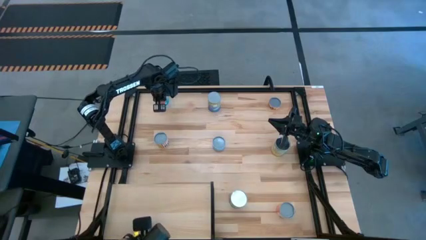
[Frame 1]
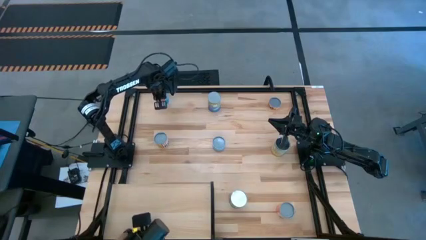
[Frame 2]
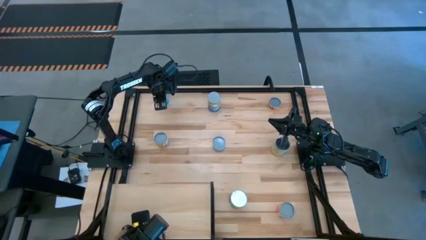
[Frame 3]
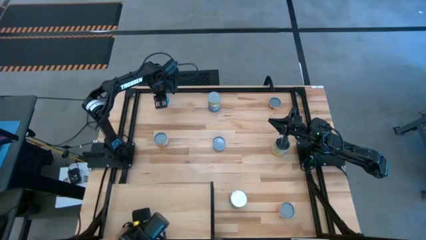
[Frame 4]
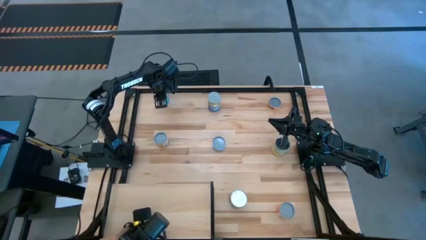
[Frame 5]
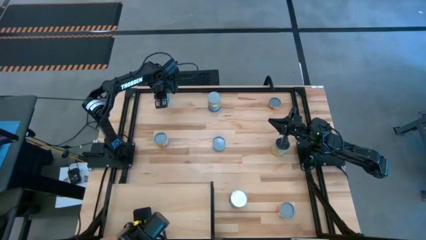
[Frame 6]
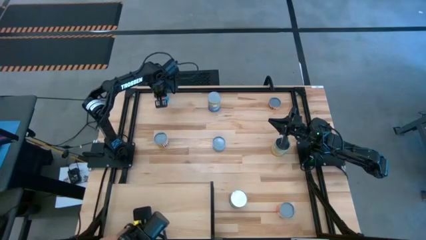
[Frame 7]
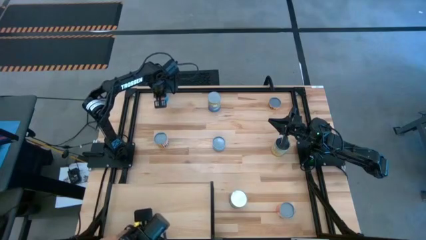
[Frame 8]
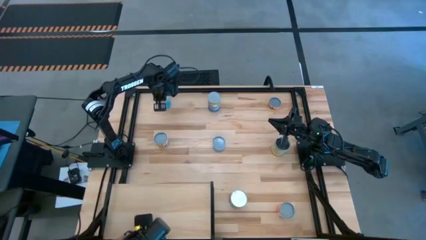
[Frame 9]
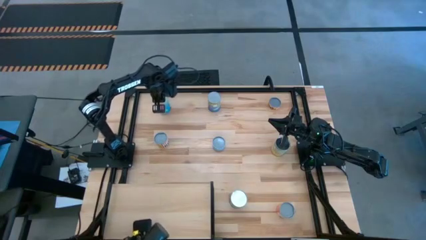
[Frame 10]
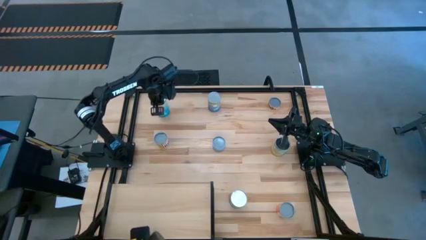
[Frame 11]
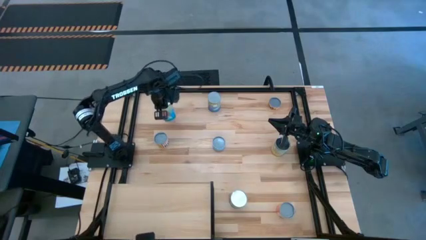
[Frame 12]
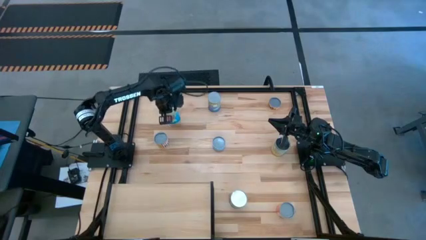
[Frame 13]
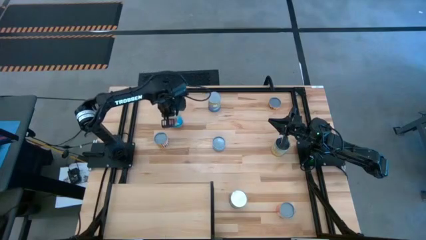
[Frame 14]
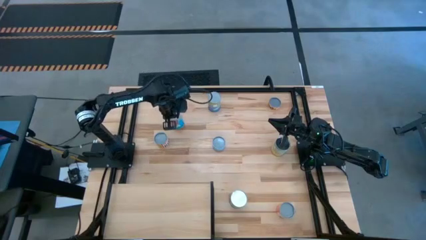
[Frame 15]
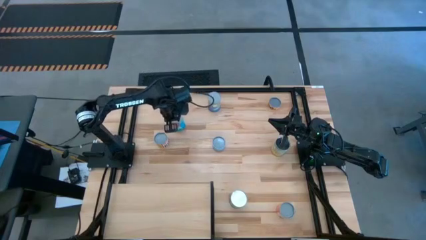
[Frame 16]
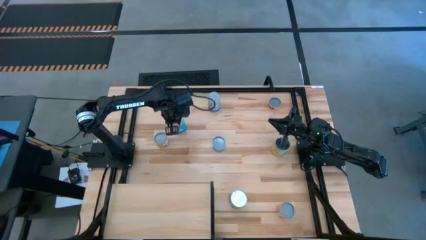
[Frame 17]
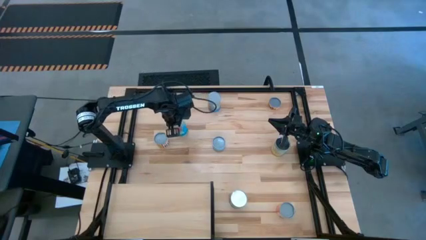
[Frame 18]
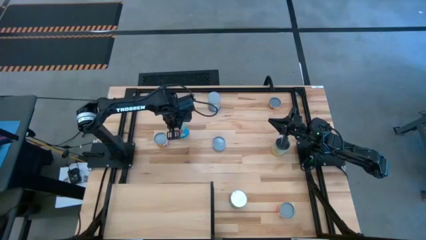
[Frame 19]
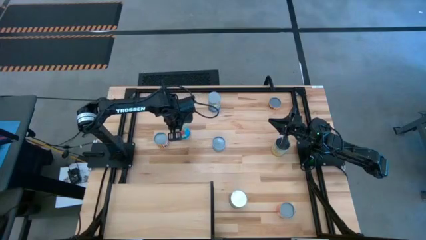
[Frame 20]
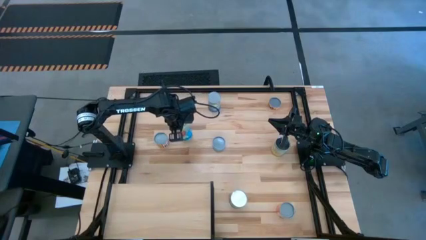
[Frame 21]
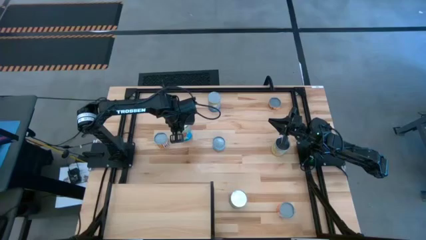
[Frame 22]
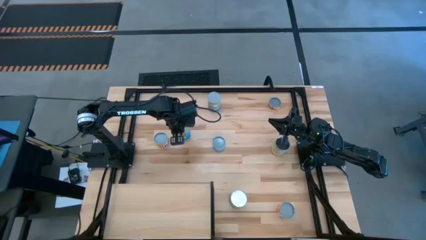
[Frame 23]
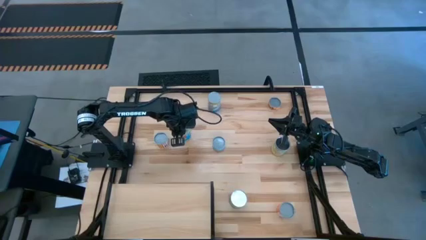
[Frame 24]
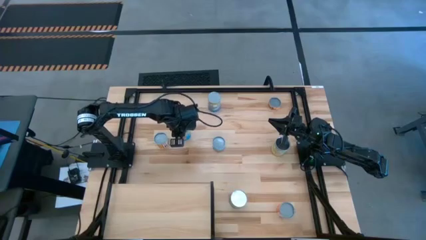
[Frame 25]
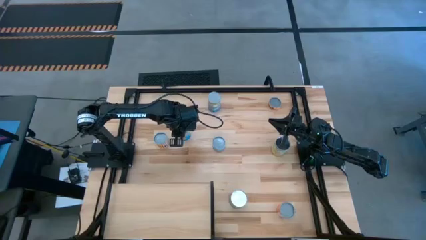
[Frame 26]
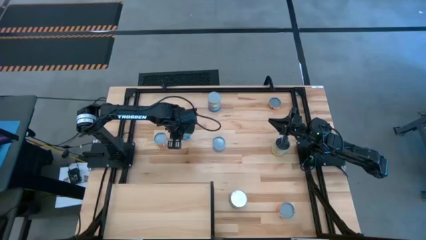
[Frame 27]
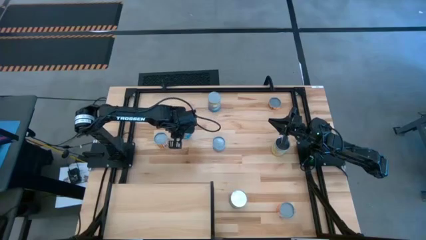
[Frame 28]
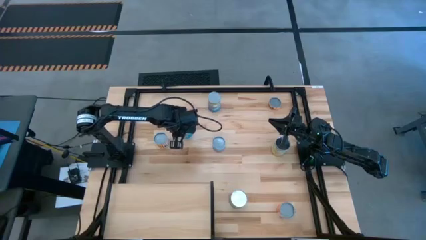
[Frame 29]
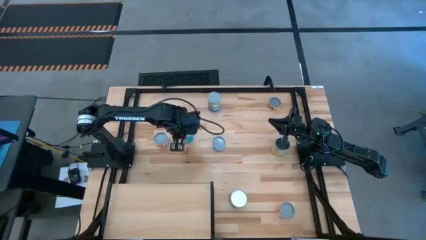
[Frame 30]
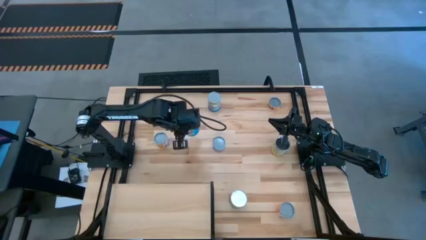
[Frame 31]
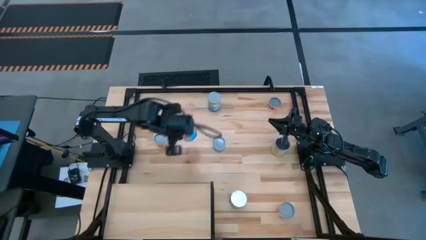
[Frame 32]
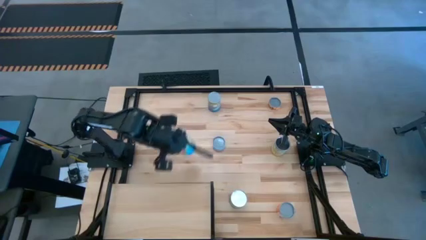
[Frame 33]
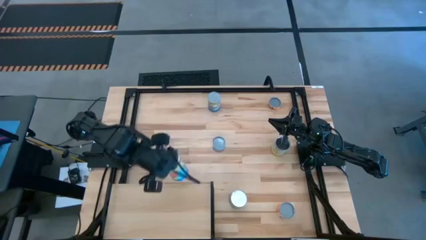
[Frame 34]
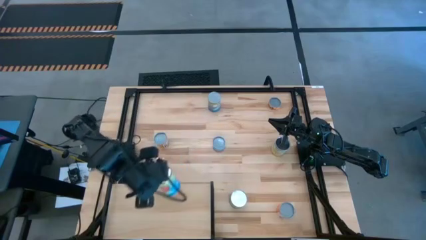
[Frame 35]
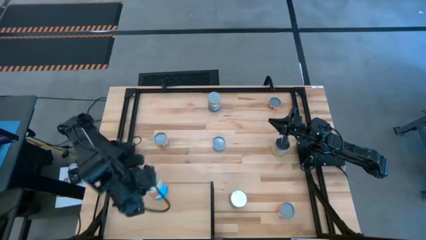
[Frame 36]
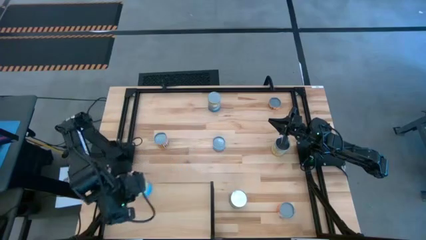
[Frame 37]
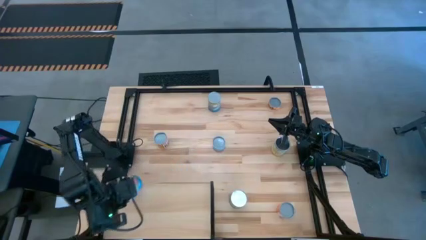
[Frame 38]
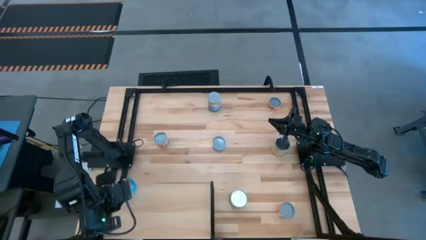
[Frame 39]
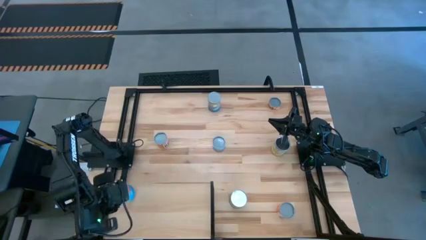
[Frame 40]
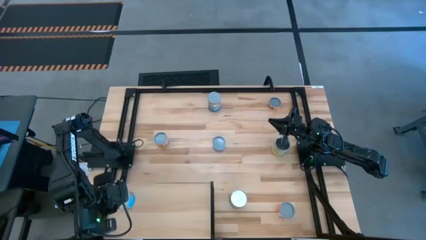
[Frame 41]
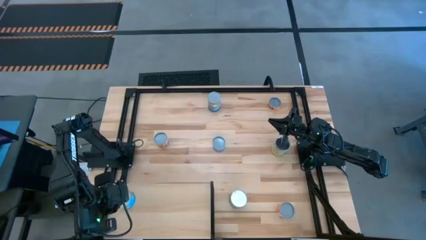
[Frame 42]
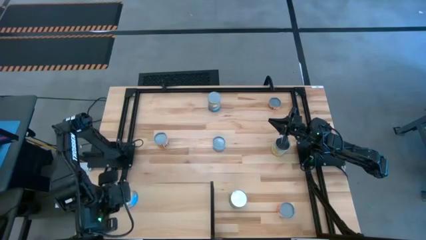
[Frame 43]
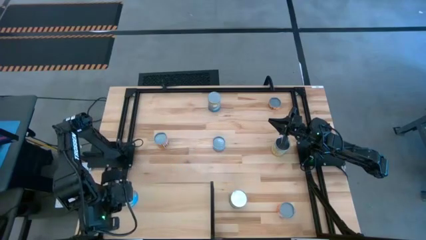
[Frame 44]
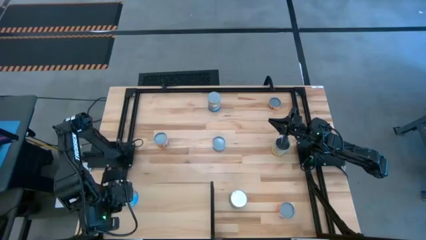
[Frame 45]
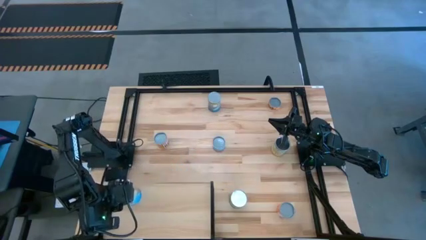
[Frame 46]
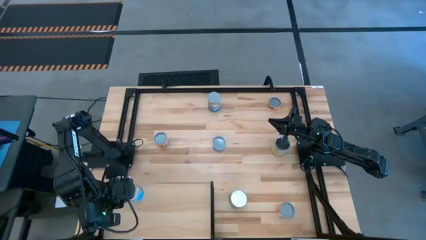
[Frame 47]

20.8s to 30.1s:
Task: Pick and place cans onto a shelf
Put the canned tomatoes on the shelf
